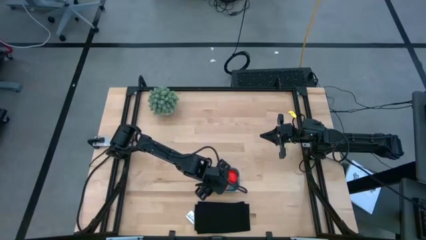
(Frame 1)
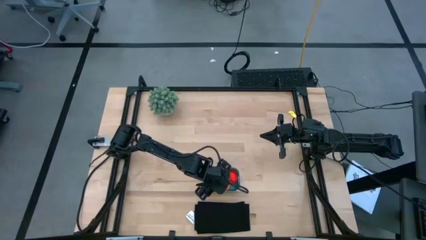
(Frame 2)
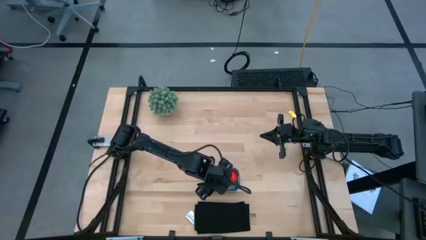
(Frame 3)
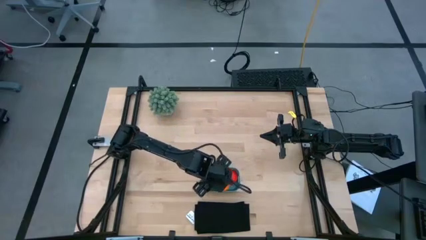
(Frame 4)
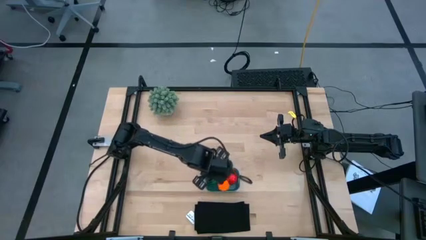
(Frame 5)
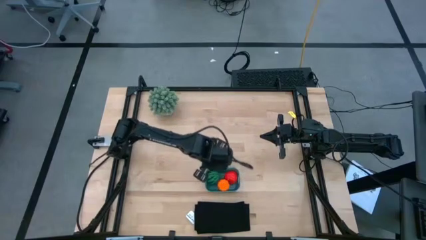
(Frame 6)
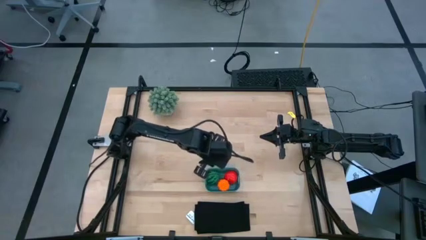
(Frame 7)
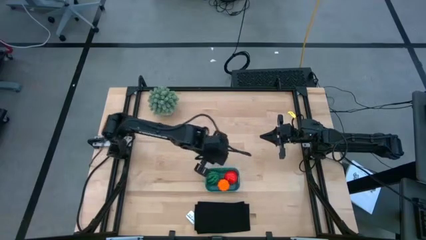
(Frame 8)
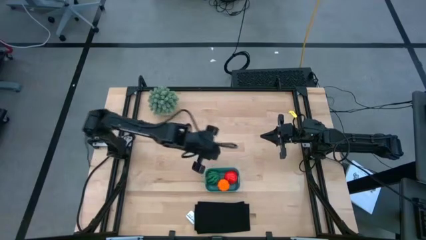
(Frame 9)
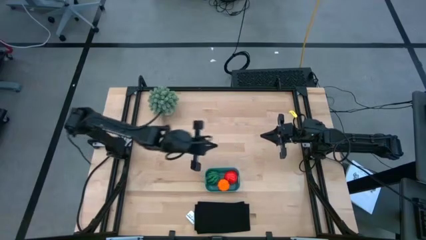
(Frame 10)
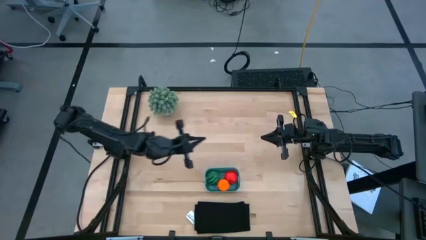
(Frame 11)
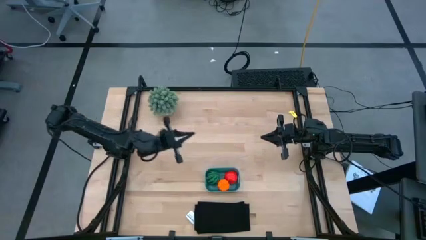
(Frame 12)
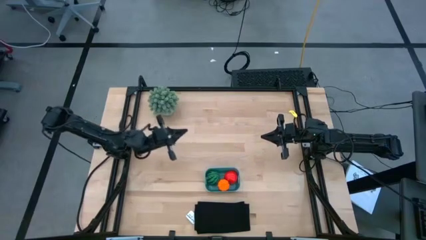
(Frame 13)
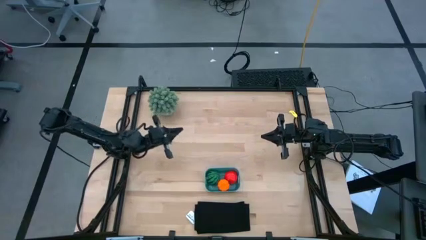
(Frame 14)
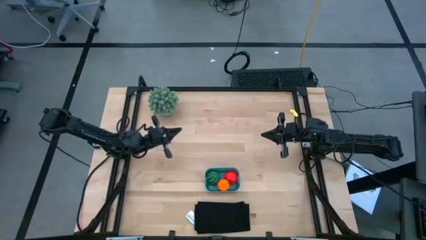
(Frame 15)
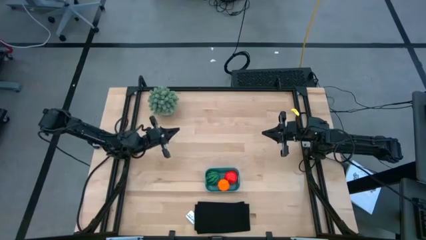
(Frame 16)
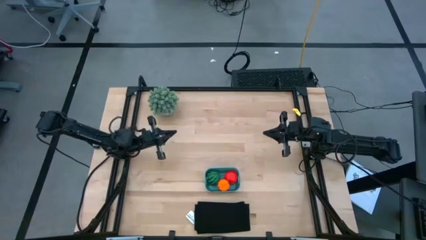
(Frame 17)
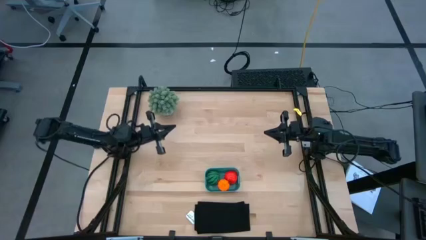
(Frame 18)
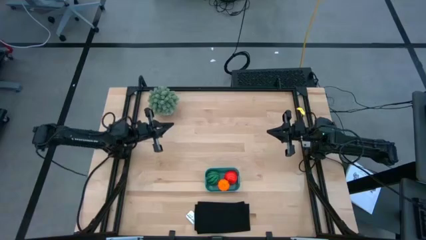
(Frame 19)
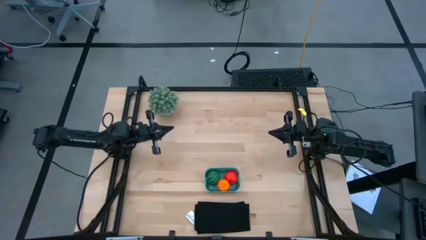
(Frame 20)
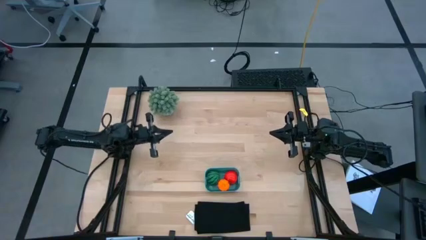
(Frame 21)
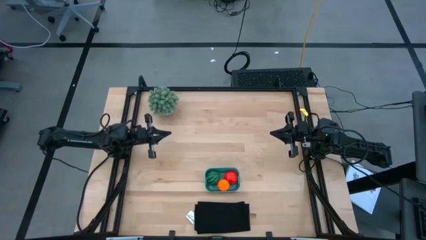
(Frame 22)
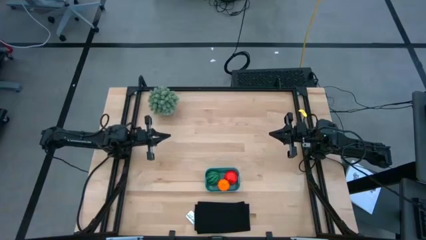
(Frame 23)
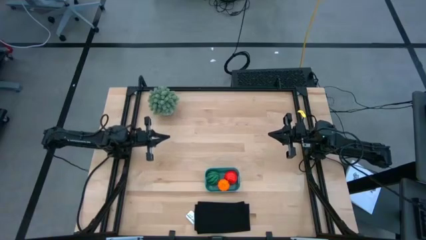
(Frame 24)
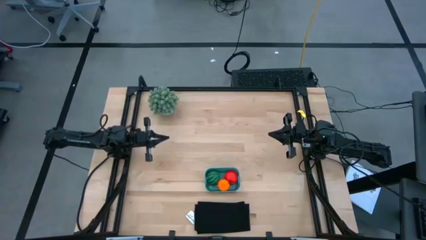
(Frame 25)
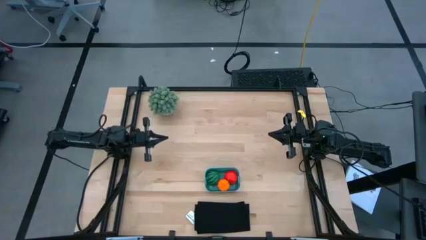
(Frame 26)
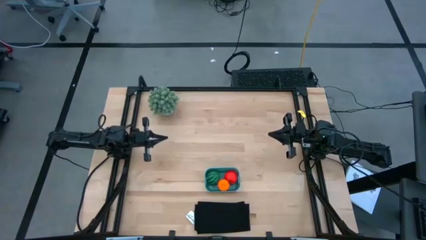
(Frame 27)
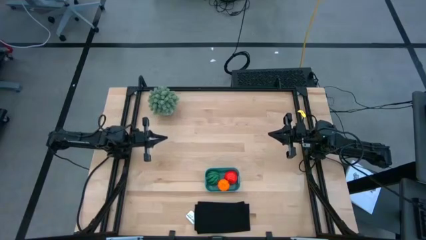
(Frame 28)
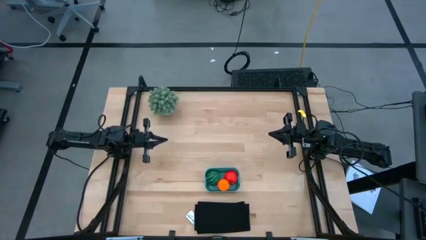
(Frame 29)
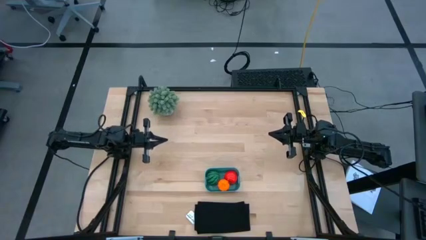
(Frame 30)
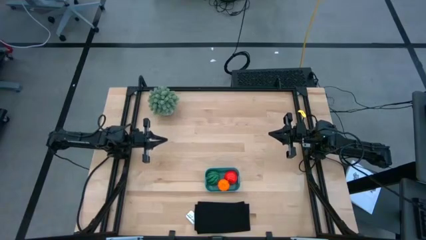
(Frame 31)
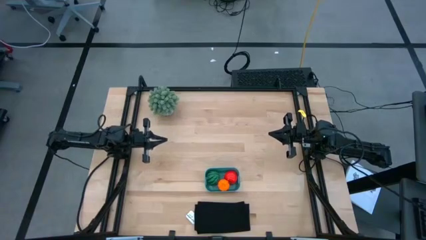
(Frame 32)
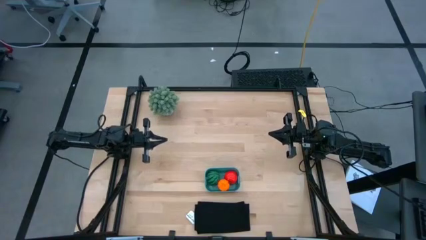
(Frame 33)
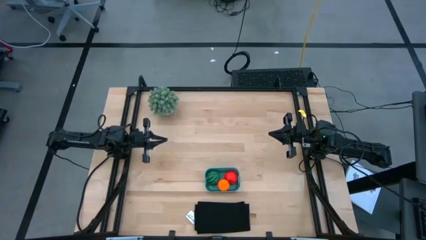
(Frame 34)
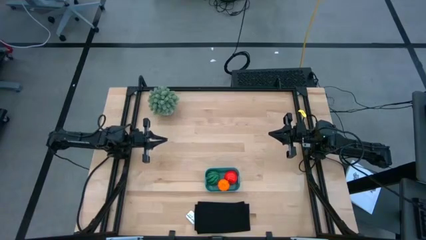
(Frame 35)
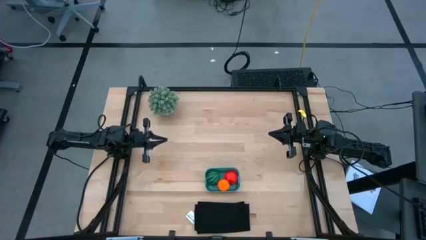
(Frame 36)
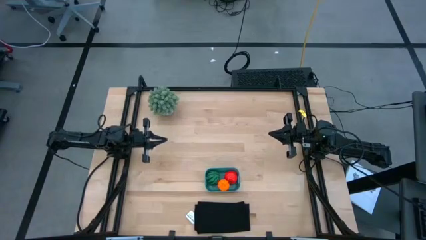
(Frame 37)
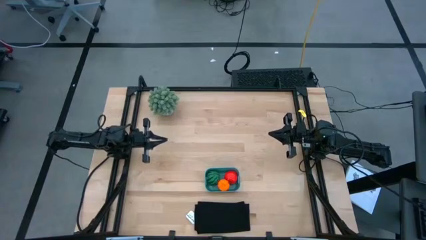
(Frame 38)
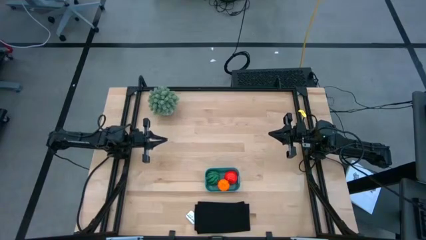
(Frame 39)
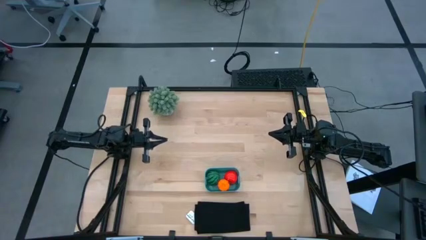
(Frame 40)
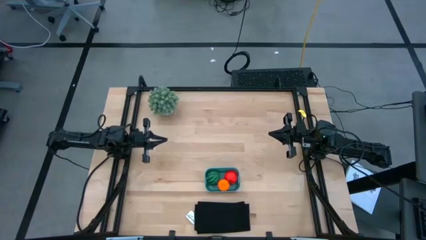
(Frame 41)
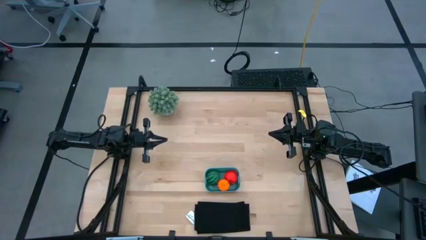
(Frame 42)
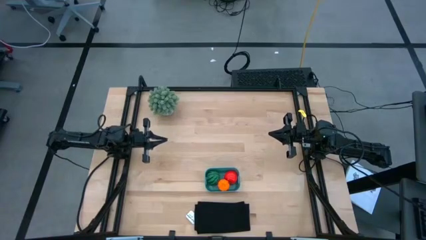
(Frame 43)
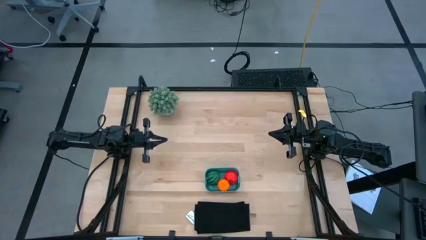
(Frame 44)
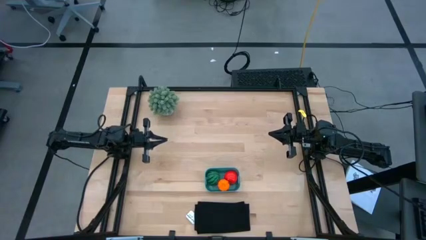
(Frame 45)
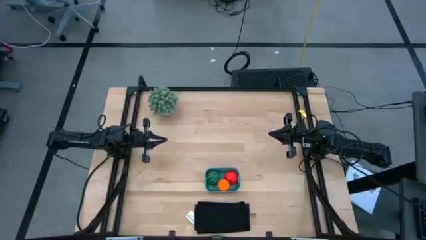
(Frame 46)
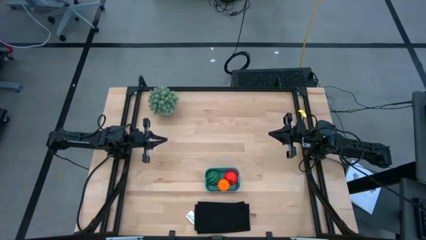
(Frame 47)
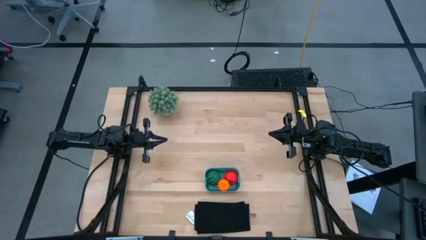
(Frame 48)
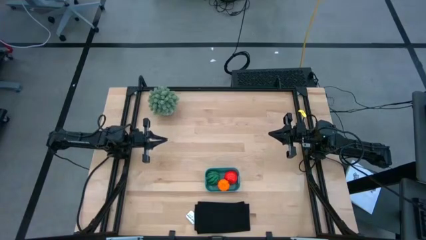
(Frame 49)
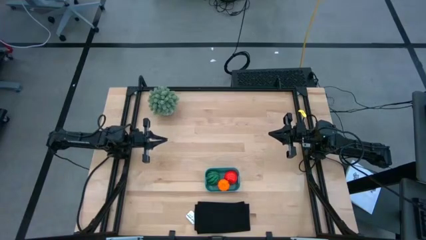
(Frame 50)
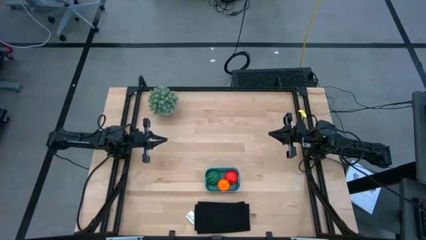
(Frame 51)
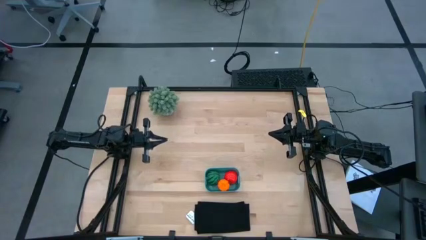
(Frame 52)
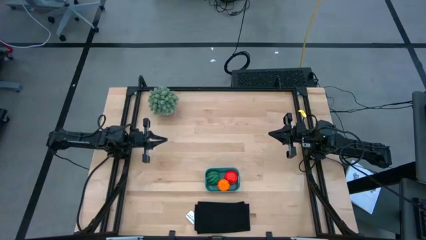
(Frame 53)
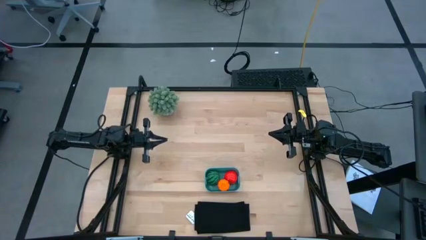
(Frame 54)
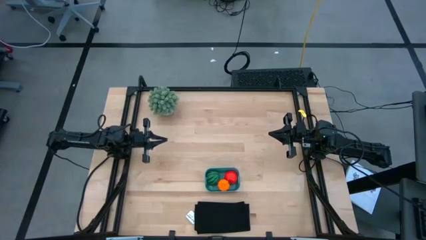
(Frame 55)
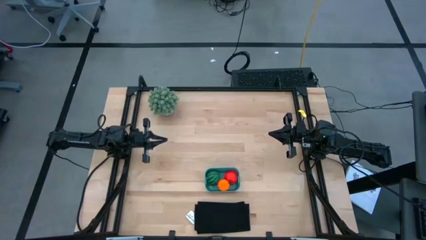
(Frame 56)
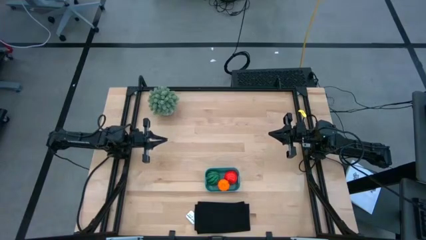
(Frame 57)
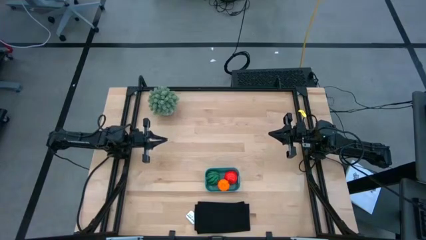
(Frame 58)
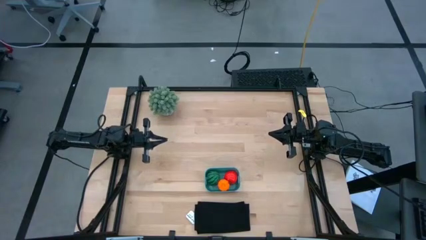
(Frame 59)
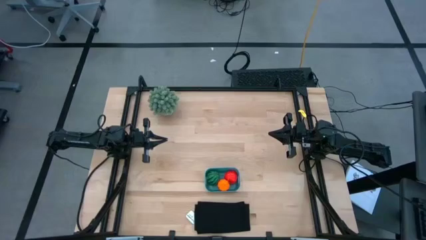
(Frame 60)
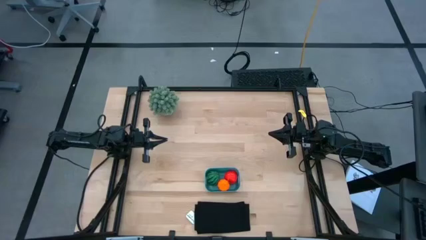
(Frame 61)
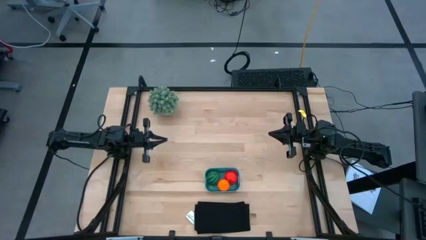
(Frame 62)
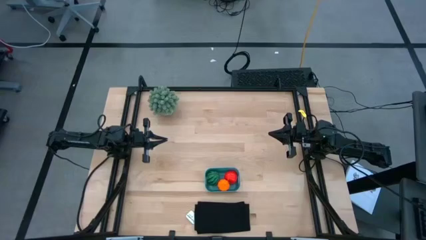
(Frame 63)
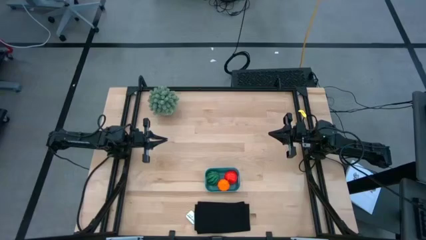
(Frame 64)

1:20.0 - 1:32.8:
Task: Pick and placing Produce into tupperware
Return to Home Position

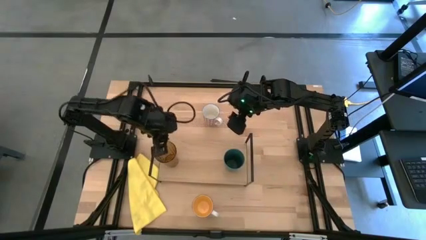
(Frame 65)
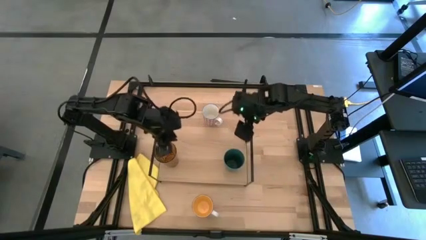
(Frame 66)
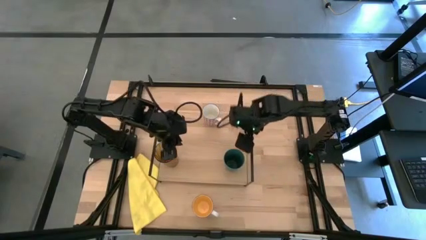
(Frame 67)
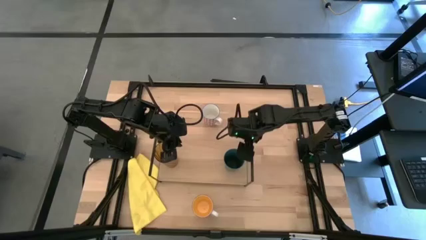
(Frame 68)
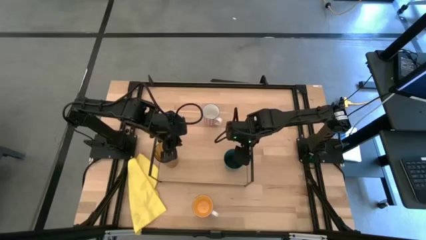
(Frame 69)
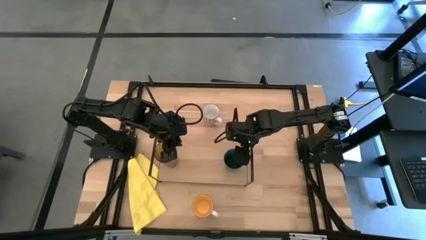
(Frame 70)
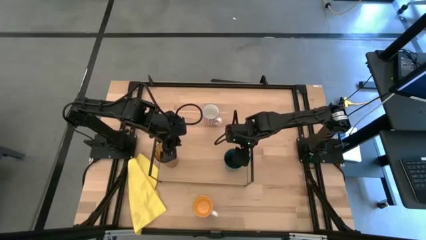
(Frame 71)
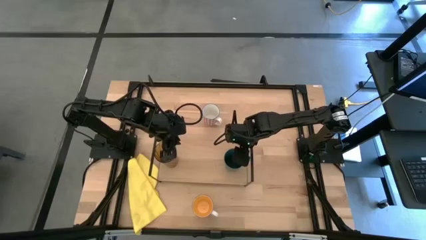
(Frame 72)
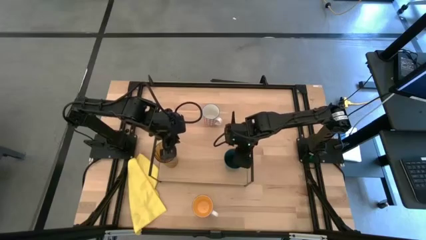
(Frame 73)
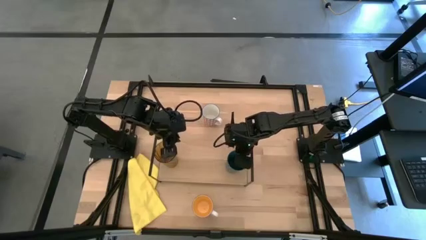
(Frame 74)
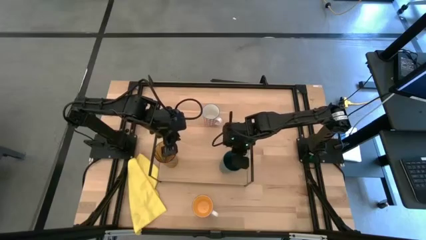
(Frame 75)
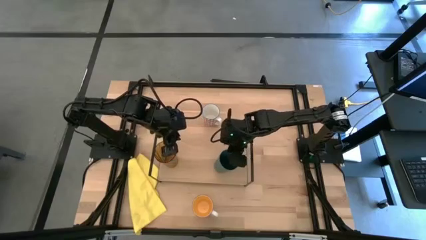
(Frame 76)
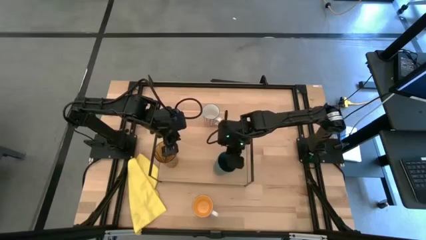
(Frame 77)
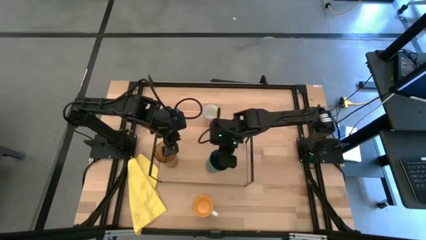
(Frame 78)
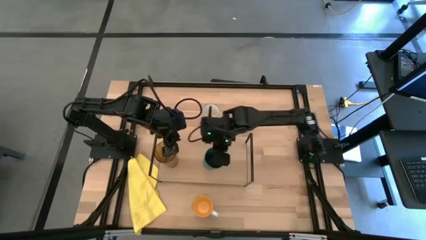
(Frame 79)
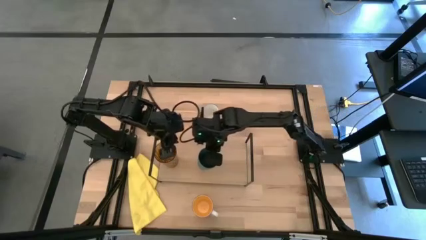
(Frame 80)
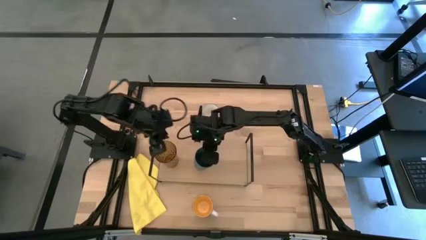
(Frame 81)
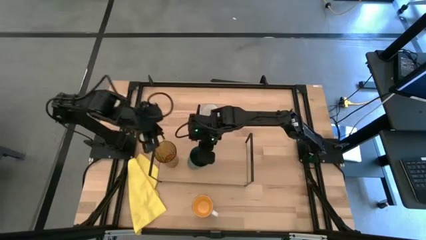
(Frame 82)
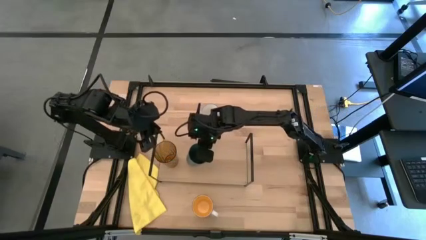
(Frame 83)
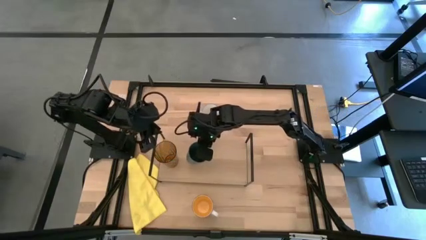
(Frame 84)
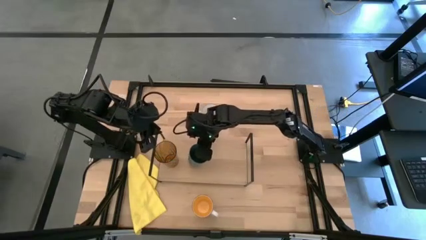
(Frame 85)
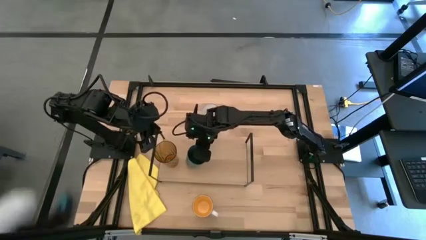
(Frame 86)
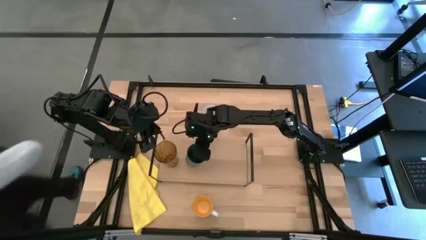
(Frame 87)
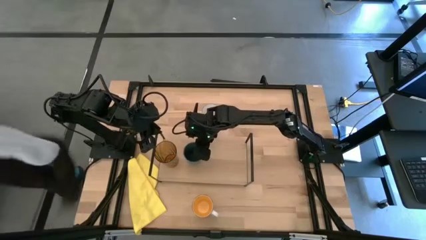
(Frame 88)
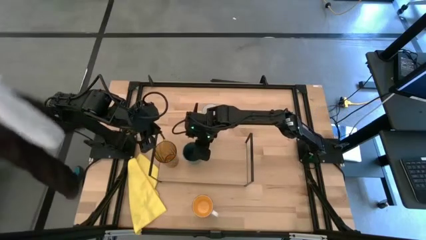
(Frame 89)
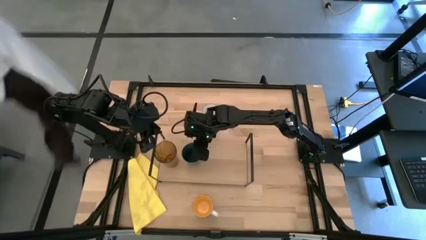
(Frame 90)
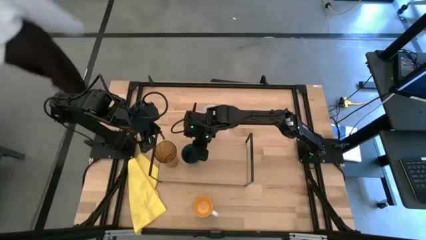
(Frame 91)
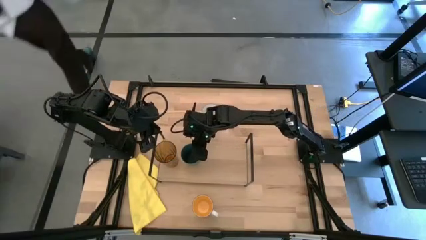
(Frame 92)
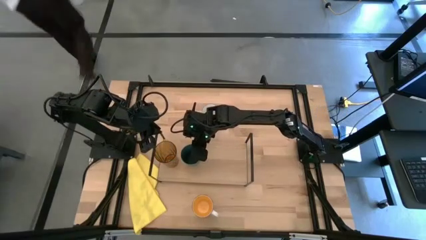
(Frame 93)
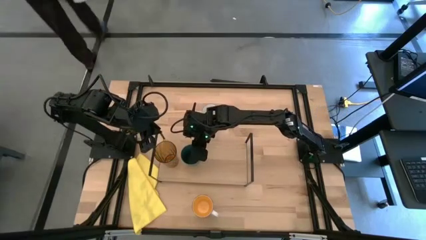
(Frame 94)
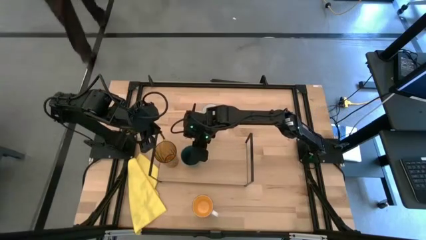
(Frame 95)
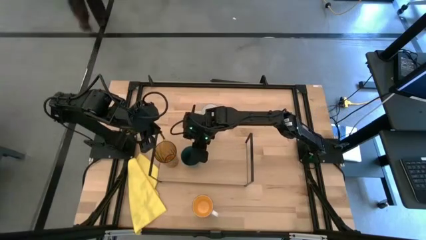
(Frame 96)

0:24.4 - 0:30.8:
Task: Stack small to large cups/mugs on shelf
Adjust the green cup on the shelf
